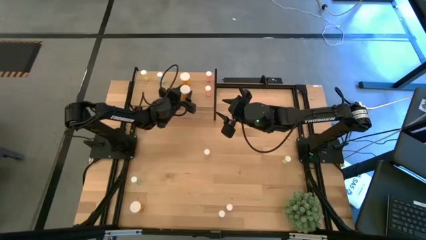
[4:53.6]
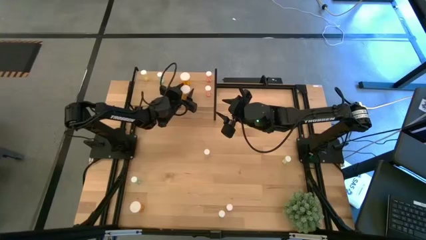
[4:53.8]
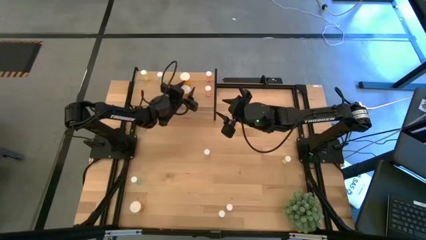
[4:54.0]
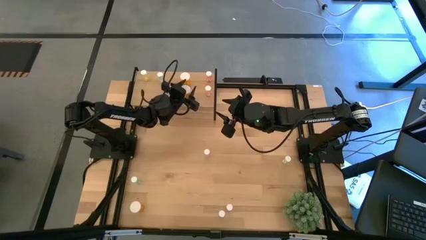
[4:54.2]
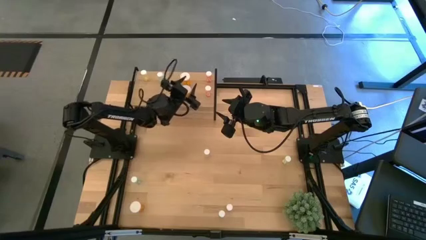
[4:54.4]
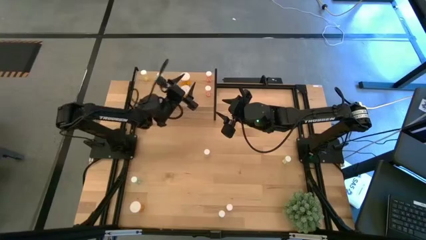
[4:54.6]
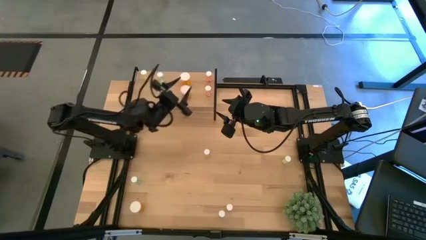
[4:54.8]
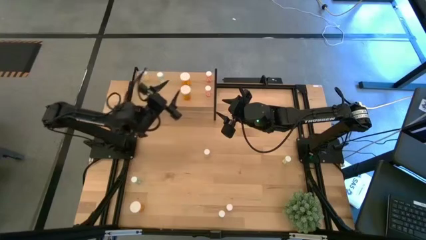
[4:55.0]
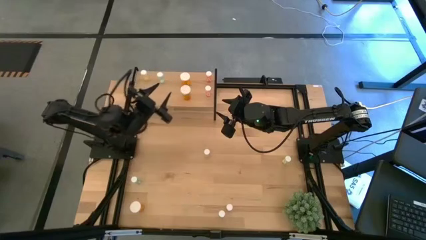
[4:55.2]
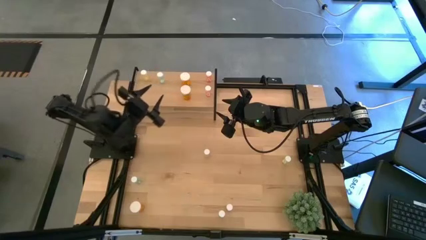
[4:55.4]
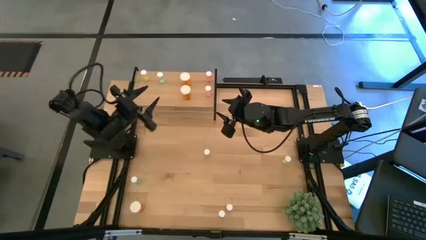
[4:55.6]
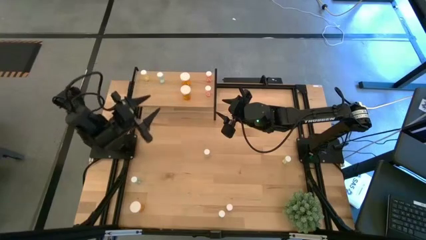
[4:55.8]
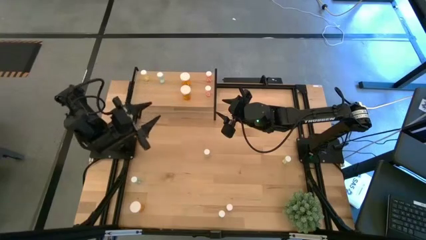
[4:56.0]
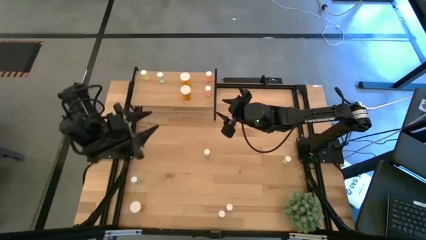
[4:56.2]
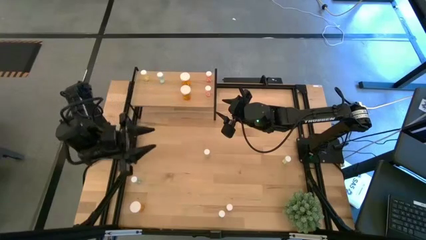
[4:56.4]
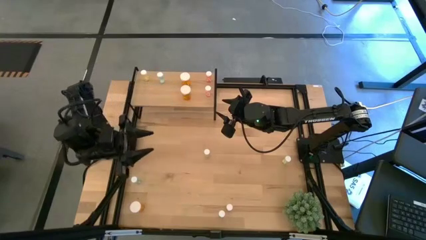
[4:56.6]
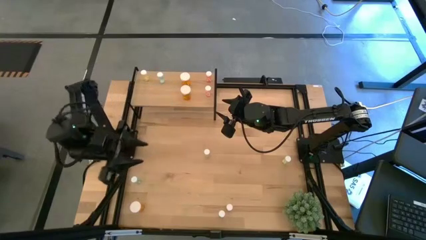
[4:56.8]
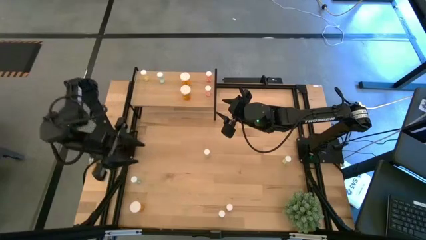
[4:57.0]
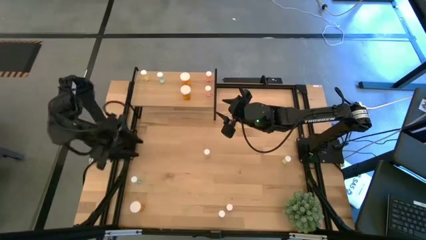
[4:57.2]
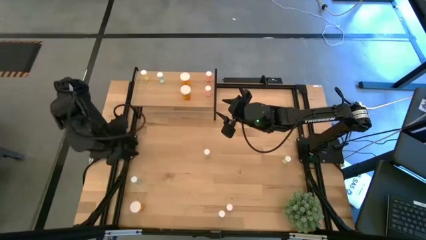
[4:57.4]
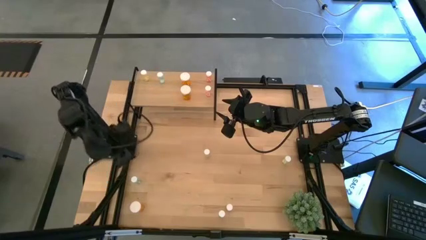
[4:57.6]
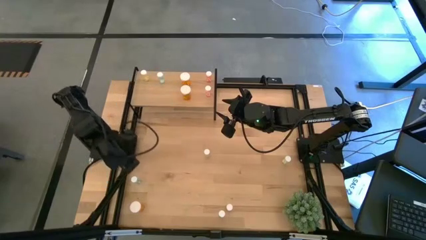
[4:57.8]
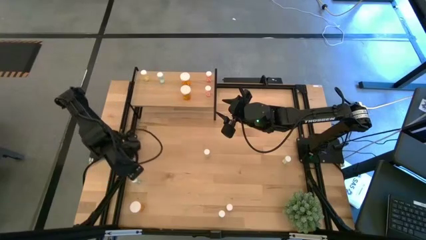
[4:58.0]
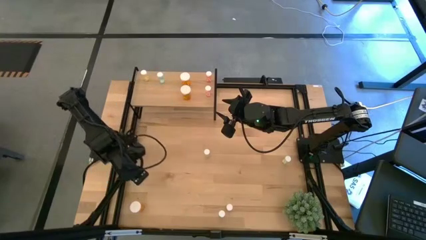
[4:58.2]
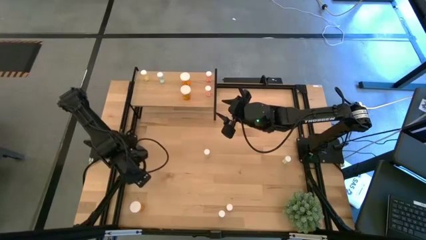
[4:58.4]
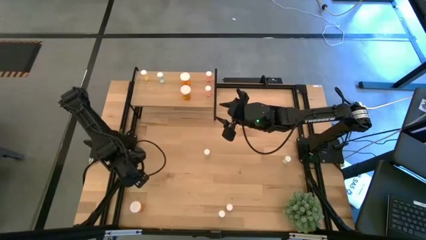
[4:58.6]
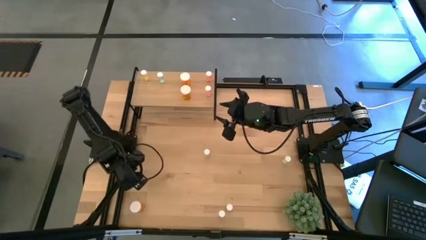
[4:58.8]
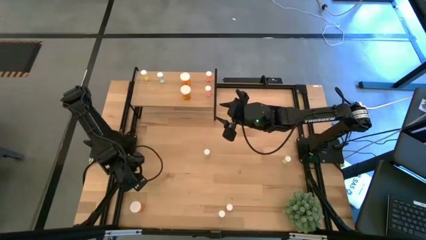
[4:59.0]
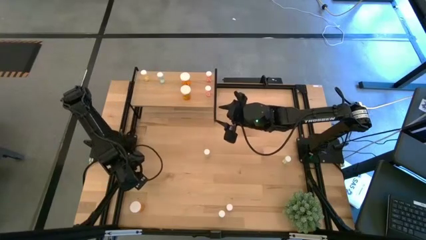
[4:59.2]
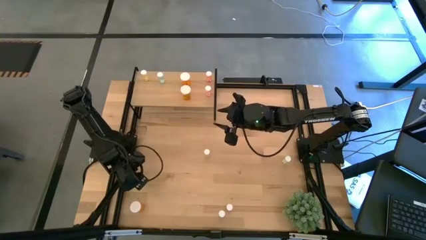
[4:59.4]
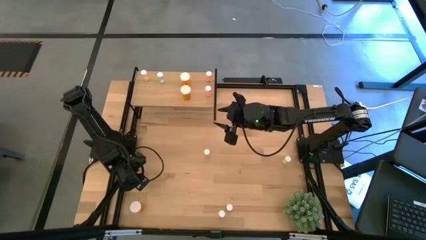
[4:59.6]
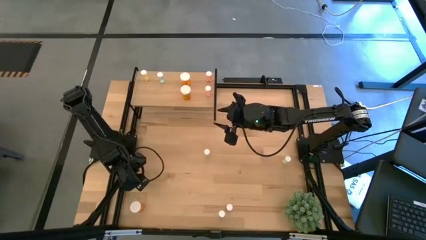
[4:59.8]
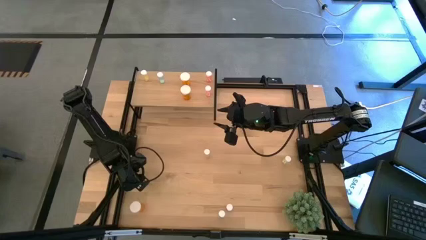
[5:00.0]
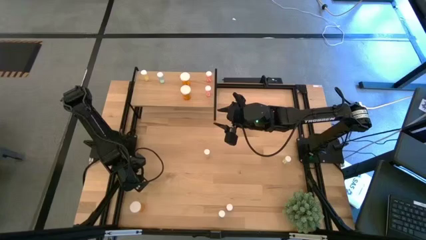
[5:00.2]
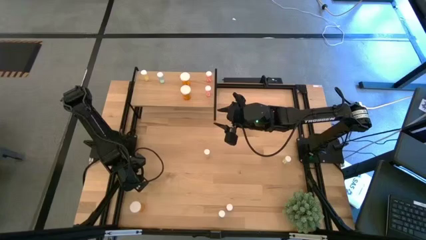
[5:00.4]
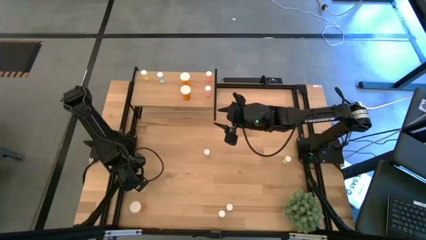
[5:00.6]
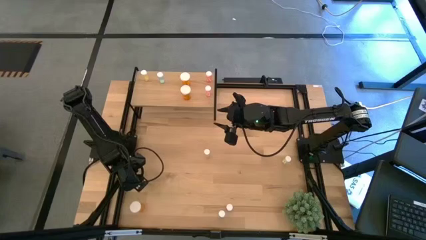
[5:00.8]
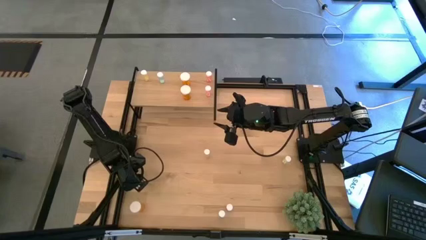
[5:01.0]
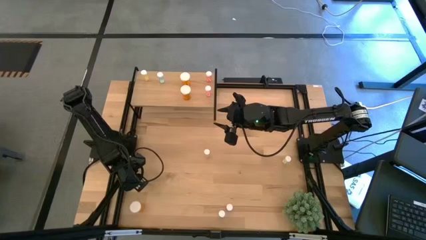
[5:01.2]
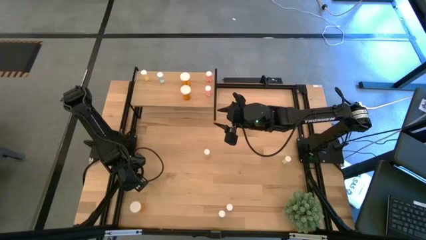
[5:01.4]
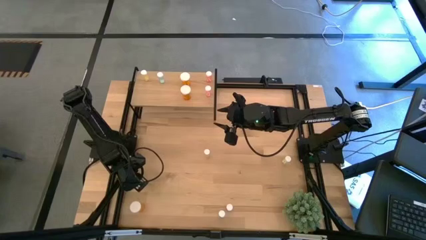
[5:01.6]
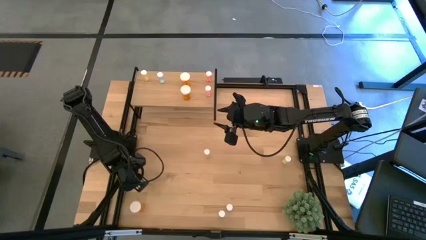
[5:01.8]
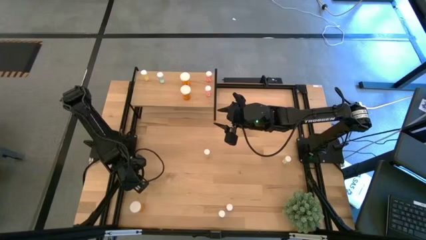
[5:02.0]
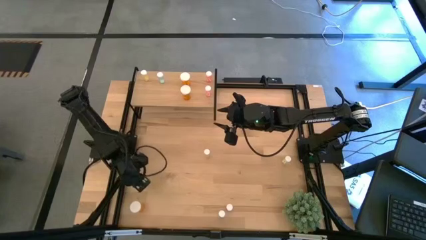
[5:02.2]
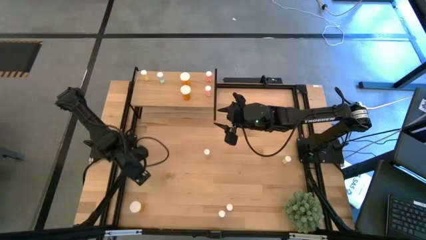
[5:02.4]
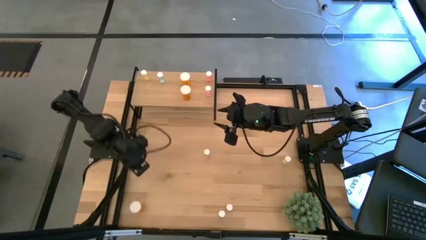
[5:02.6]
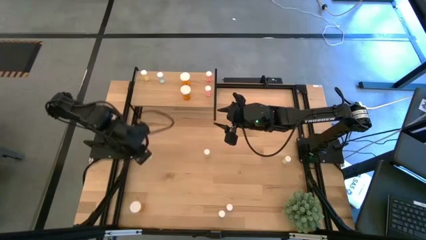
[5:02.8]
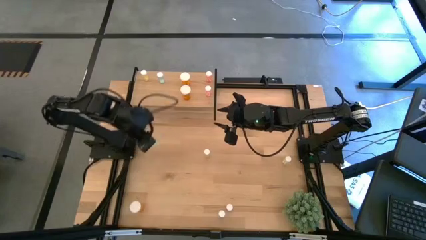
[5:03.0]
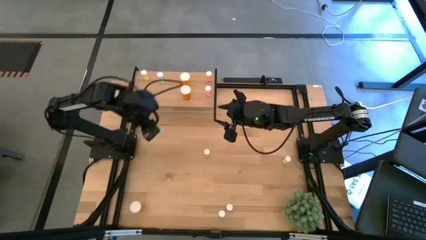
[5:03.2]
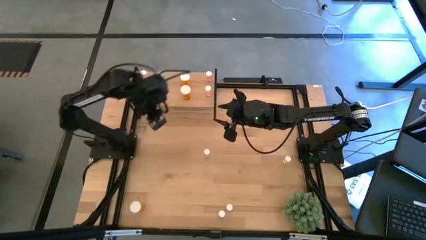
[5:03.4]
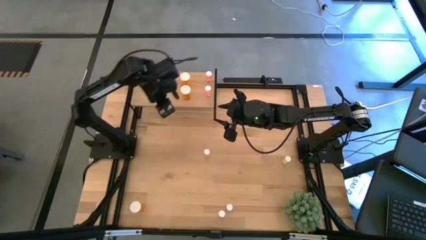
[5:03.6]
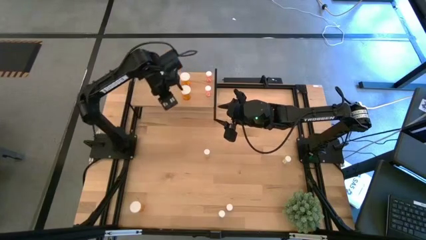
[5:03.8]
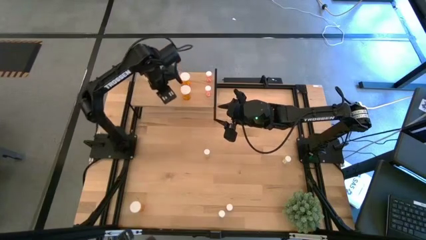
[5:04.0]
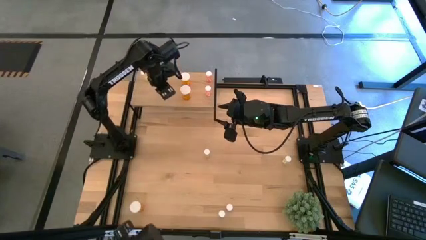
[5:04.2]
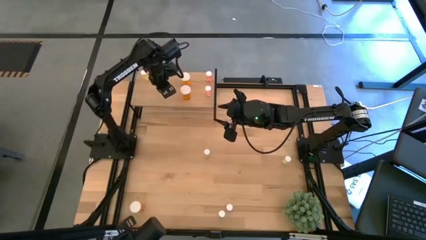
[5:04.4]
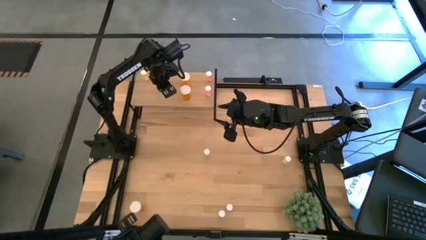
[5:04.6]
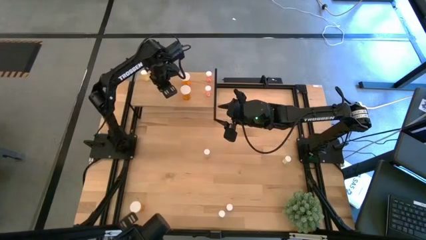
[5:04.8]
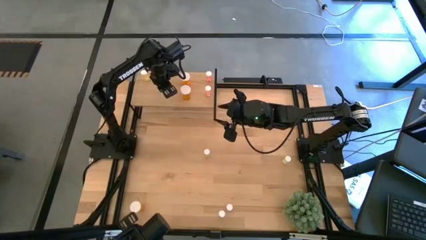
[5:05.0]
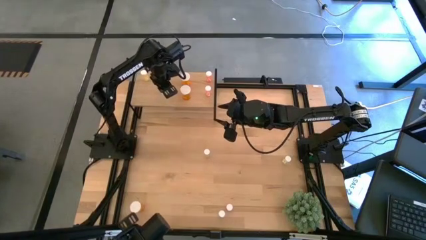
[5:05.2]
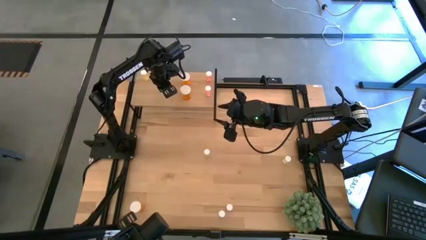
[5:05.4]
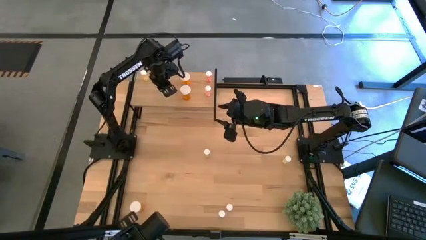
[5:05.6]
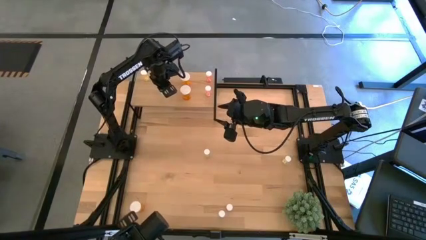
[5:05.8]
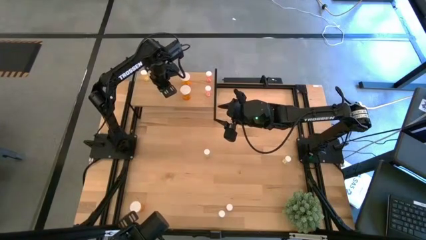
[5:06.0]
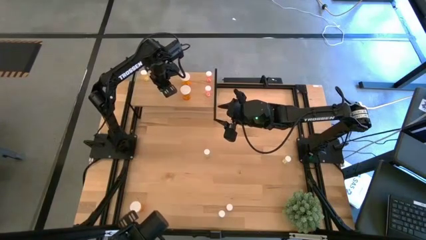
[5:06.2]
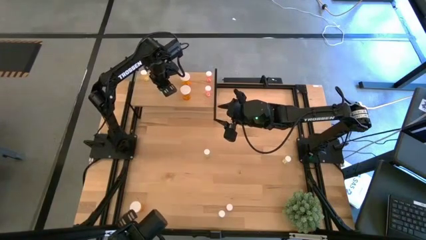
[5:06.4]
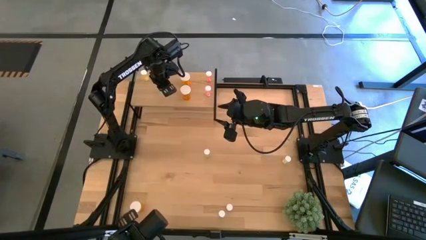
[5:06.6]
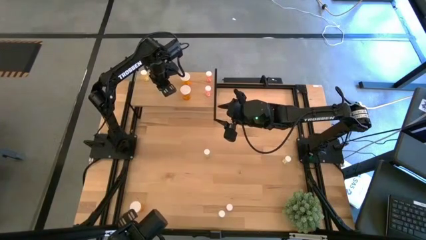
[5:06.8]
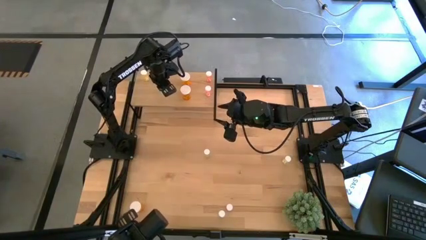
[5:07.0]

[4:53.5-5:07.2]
Task: Pick and place medicine bottles onto shelf by color
Put the left small blue pill on the shelf aligned with the blue pill on the shelf
